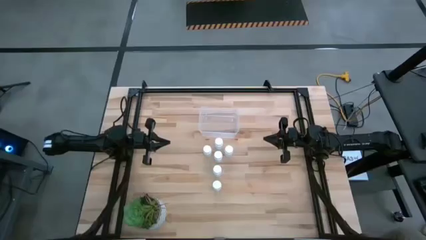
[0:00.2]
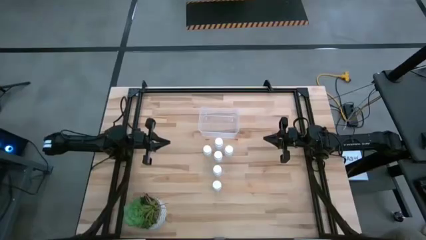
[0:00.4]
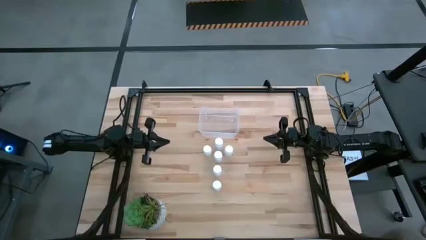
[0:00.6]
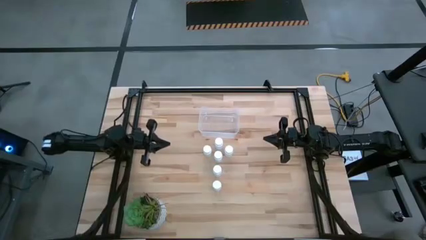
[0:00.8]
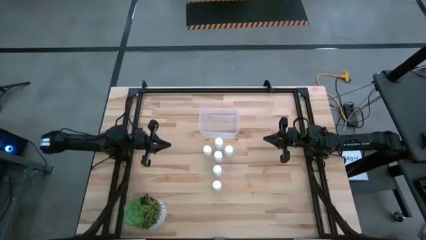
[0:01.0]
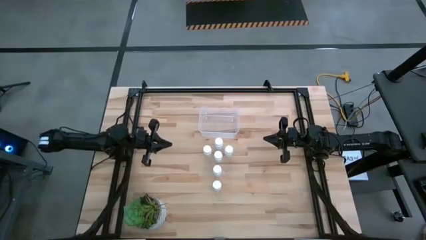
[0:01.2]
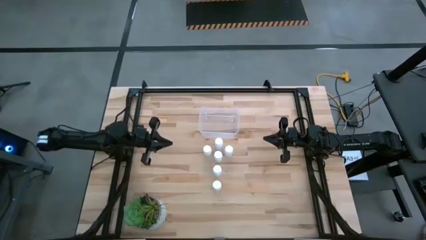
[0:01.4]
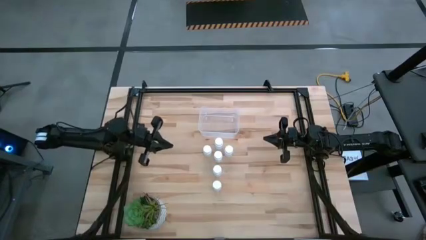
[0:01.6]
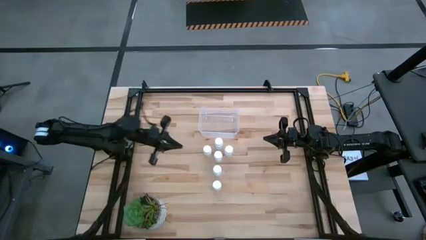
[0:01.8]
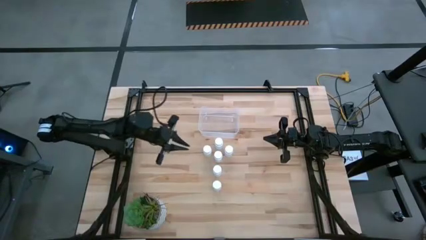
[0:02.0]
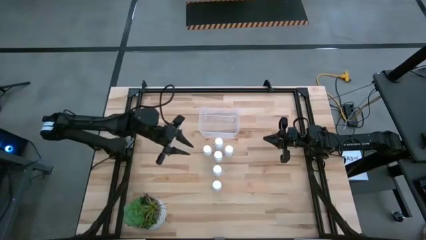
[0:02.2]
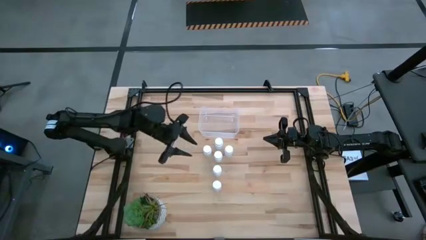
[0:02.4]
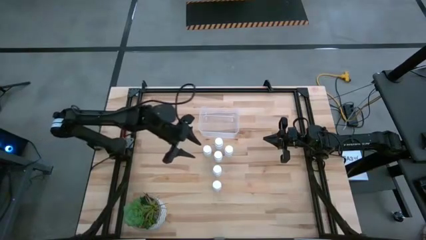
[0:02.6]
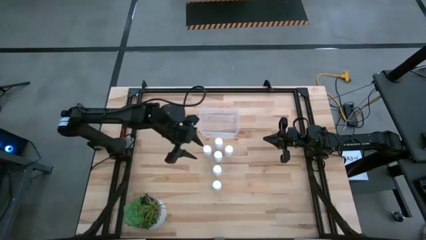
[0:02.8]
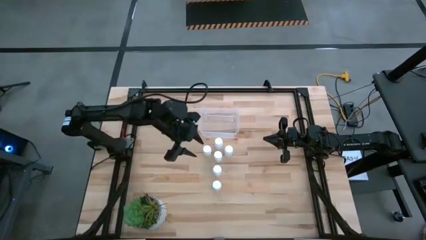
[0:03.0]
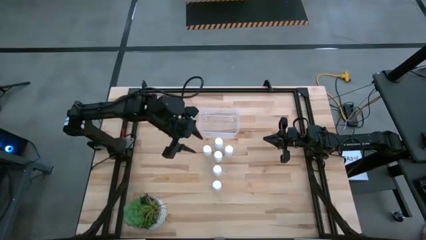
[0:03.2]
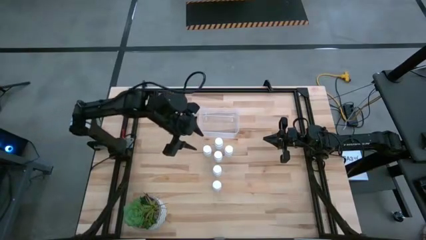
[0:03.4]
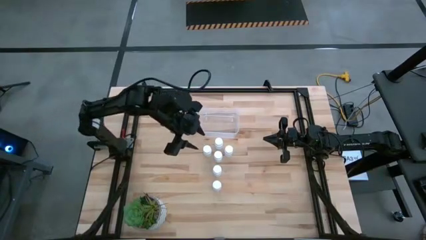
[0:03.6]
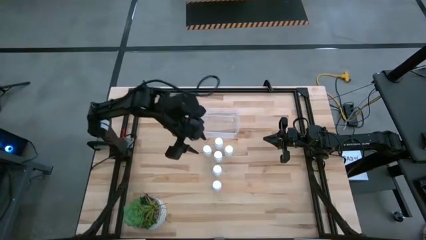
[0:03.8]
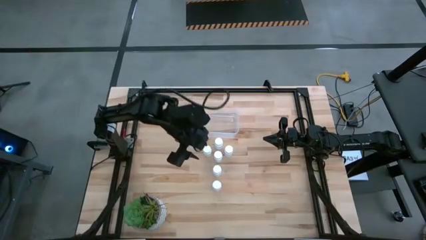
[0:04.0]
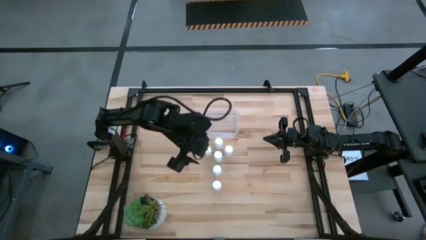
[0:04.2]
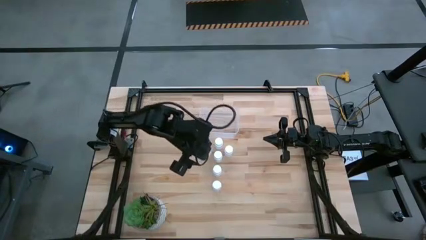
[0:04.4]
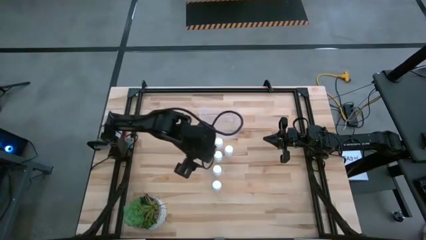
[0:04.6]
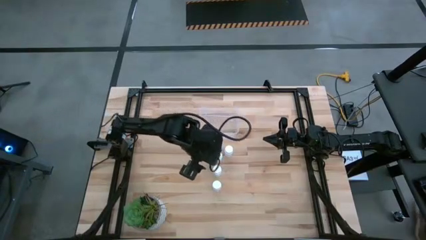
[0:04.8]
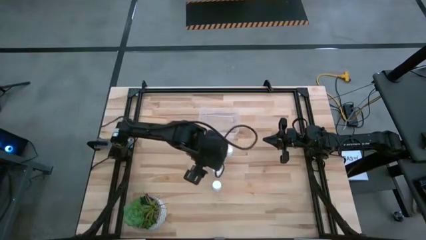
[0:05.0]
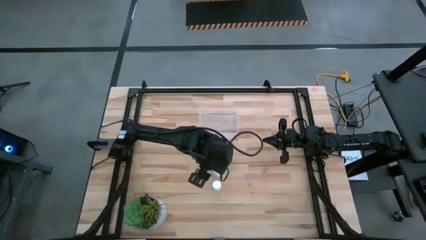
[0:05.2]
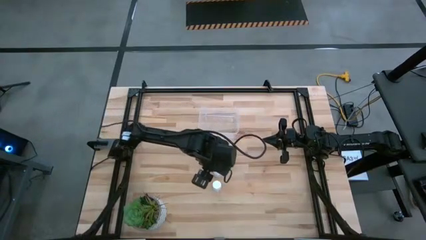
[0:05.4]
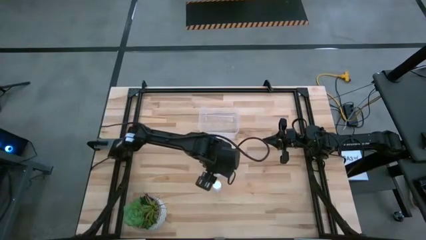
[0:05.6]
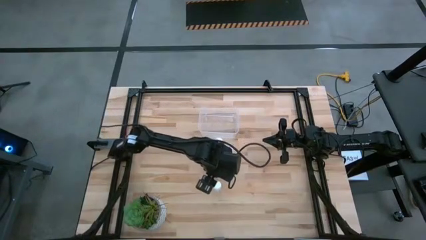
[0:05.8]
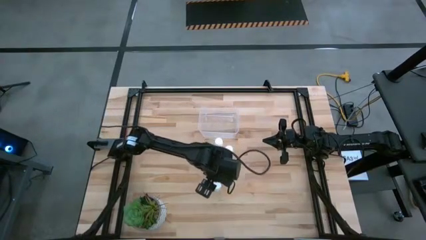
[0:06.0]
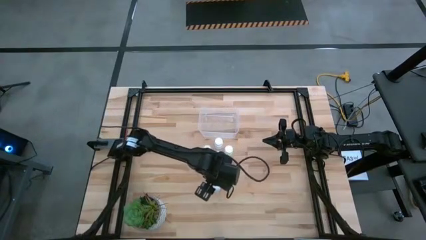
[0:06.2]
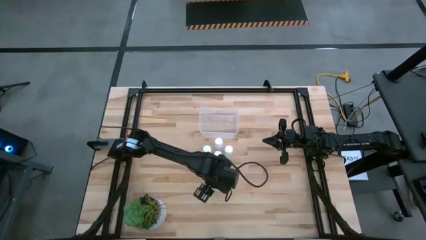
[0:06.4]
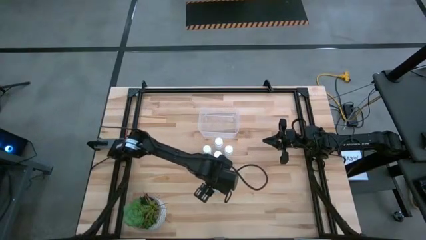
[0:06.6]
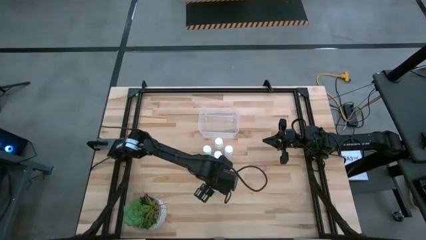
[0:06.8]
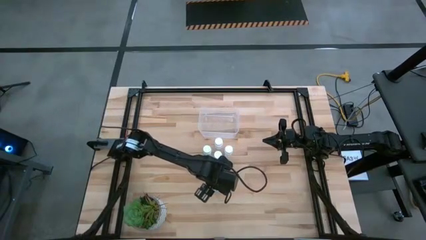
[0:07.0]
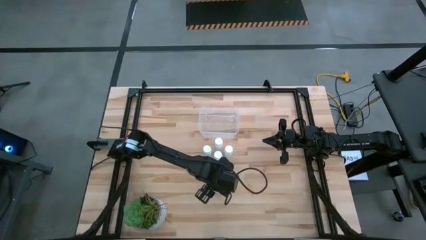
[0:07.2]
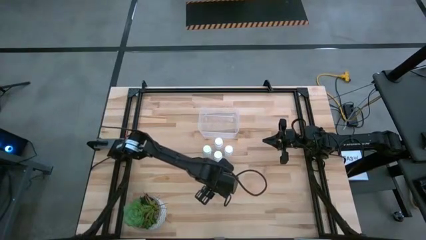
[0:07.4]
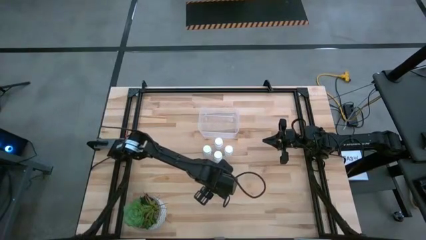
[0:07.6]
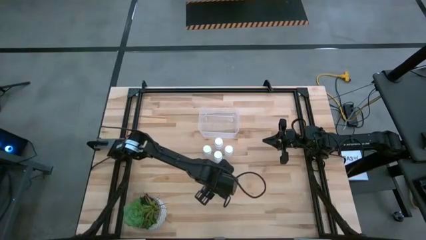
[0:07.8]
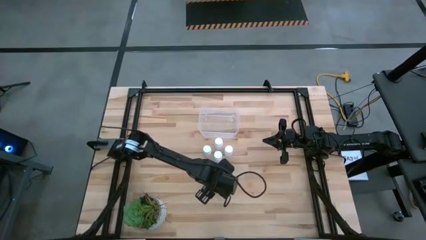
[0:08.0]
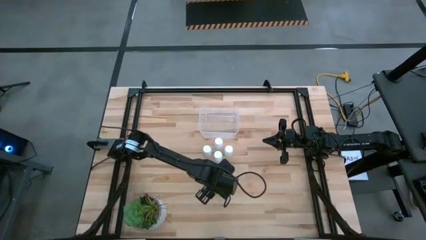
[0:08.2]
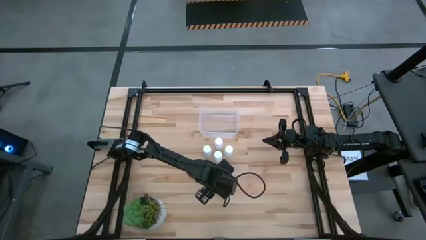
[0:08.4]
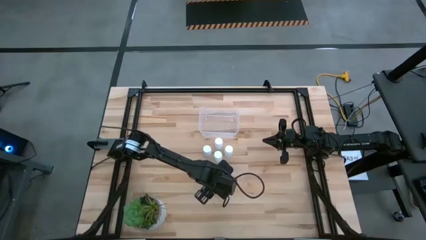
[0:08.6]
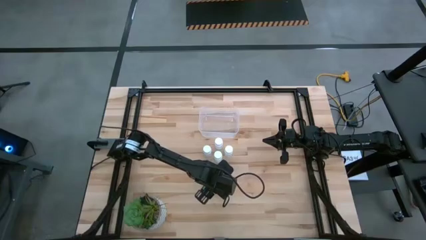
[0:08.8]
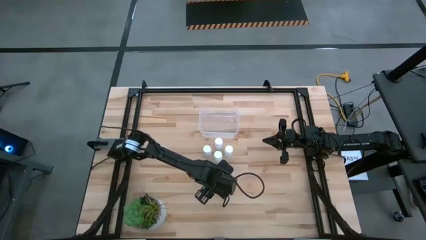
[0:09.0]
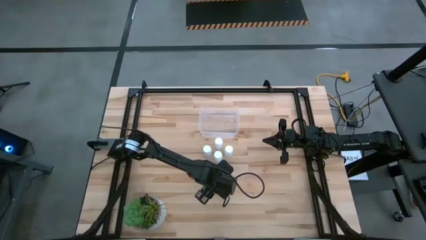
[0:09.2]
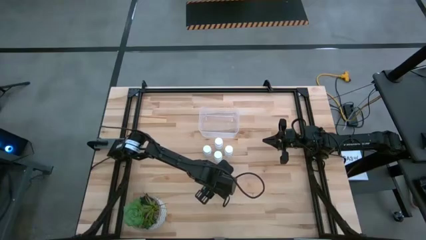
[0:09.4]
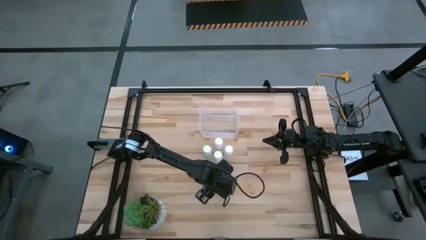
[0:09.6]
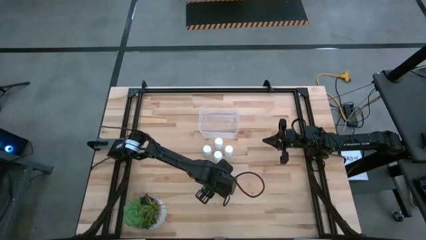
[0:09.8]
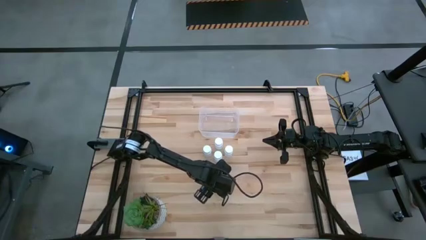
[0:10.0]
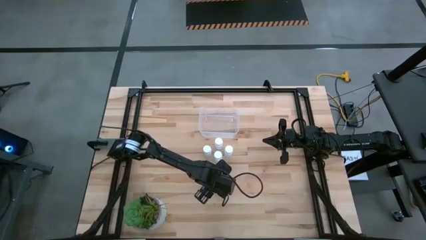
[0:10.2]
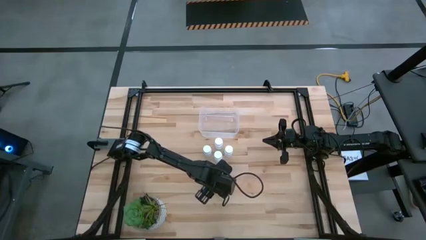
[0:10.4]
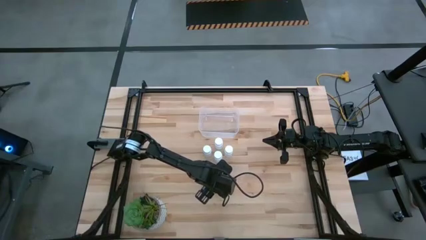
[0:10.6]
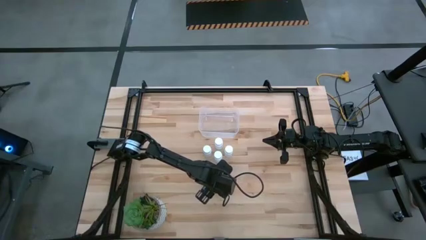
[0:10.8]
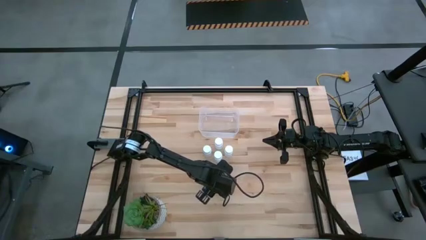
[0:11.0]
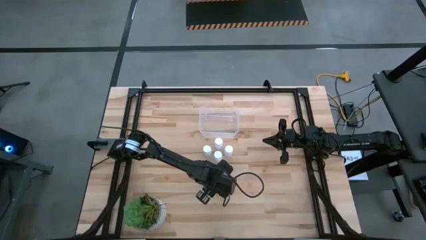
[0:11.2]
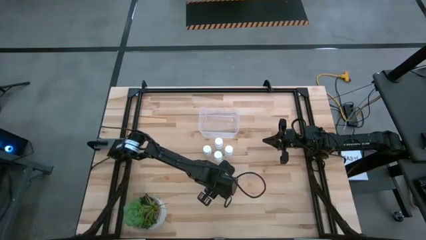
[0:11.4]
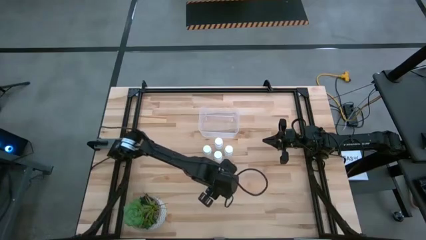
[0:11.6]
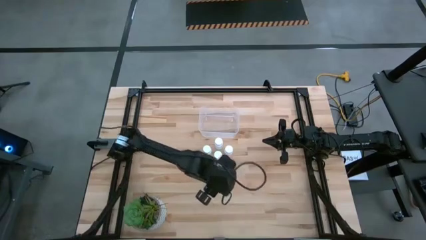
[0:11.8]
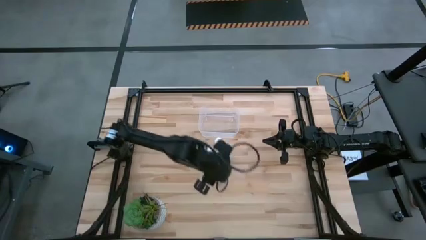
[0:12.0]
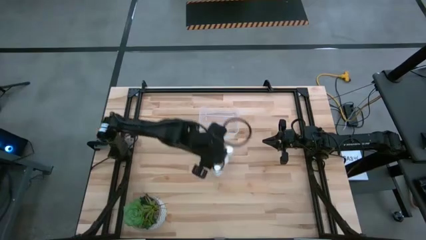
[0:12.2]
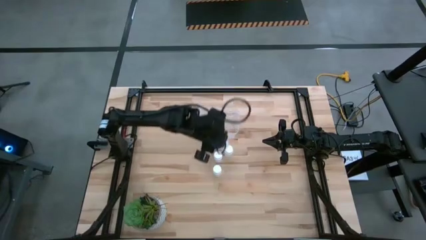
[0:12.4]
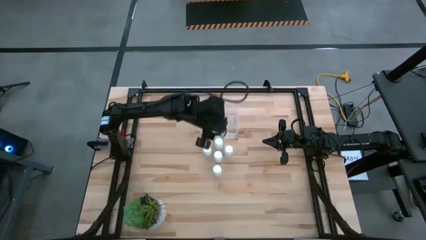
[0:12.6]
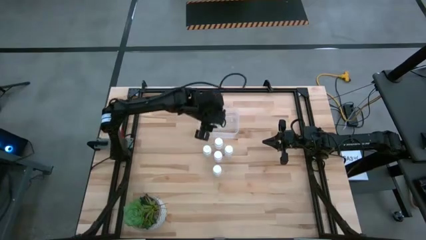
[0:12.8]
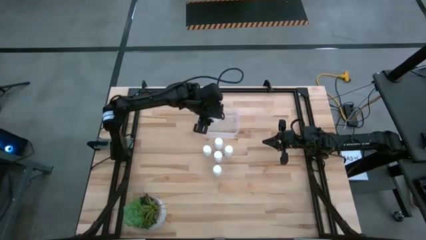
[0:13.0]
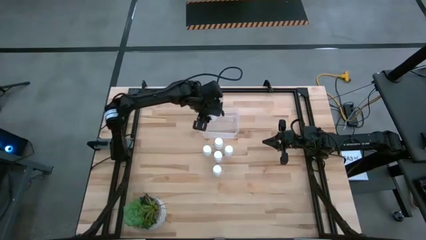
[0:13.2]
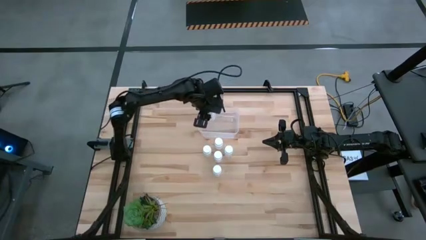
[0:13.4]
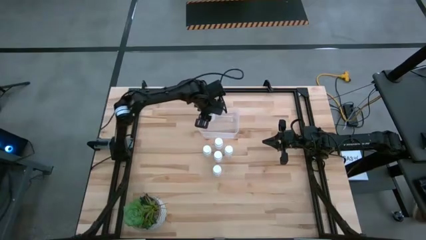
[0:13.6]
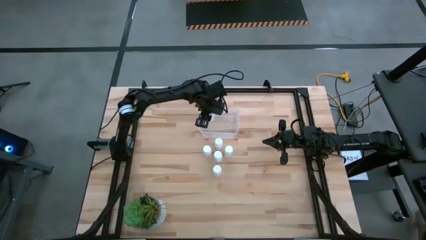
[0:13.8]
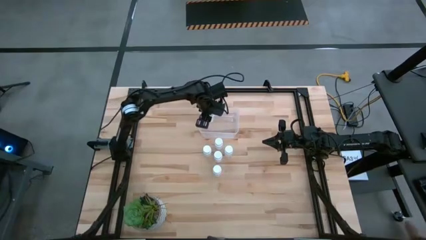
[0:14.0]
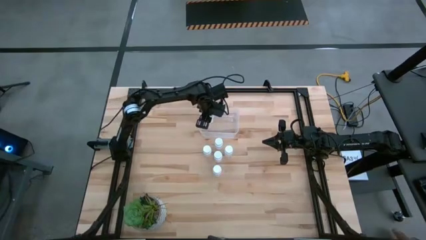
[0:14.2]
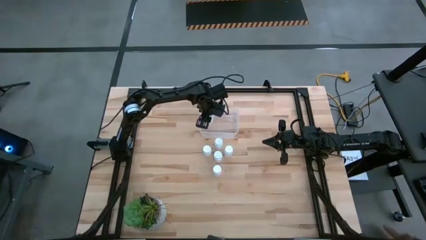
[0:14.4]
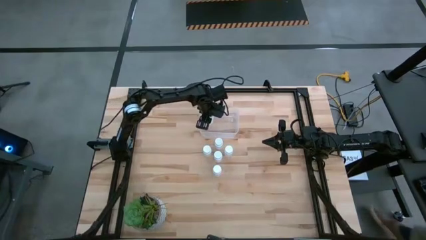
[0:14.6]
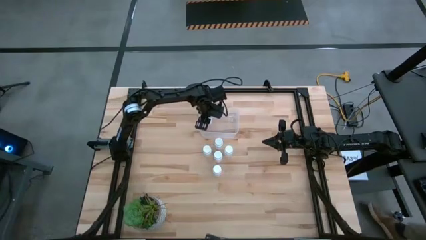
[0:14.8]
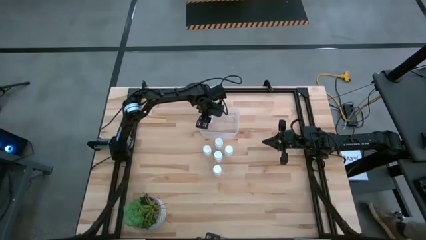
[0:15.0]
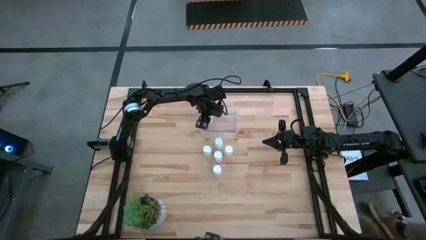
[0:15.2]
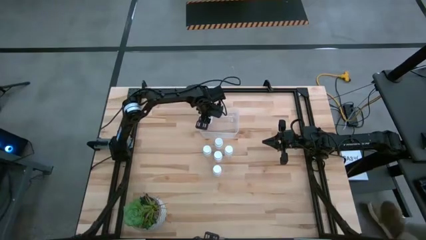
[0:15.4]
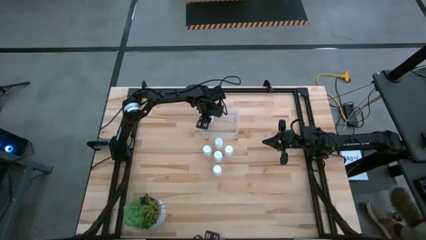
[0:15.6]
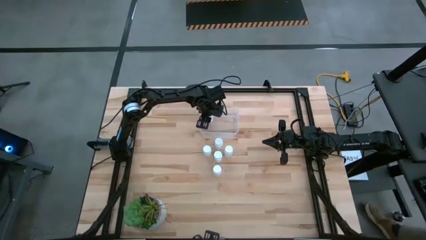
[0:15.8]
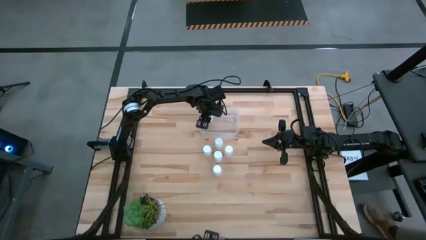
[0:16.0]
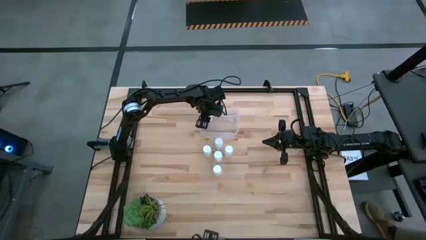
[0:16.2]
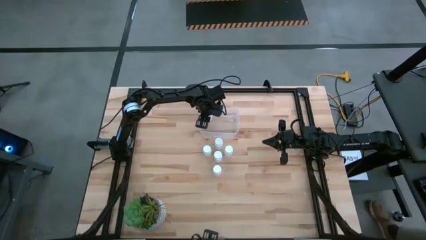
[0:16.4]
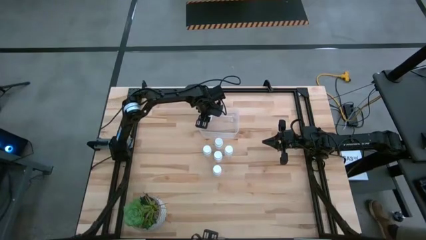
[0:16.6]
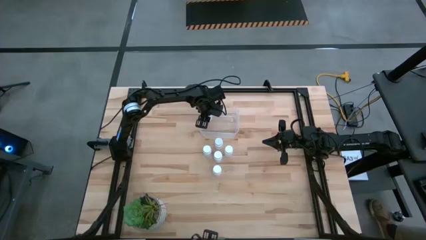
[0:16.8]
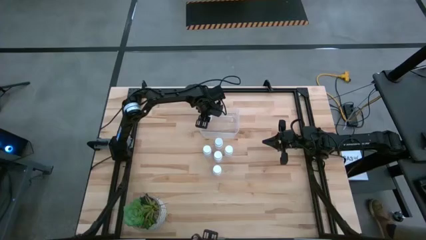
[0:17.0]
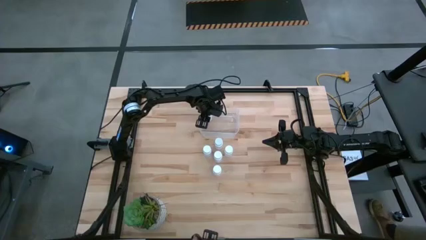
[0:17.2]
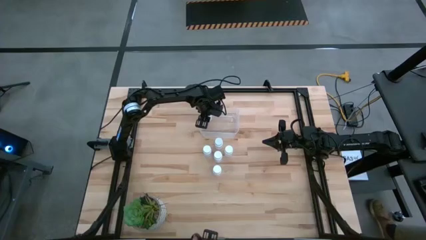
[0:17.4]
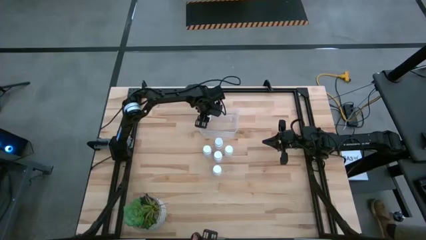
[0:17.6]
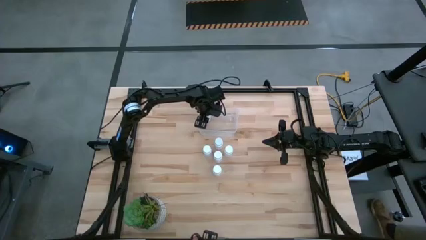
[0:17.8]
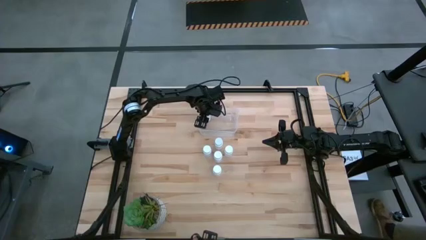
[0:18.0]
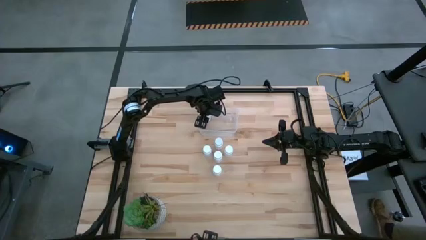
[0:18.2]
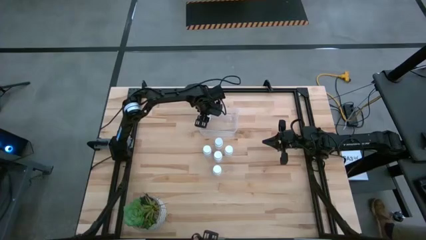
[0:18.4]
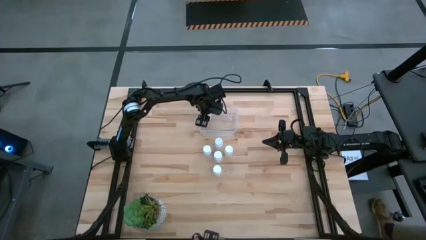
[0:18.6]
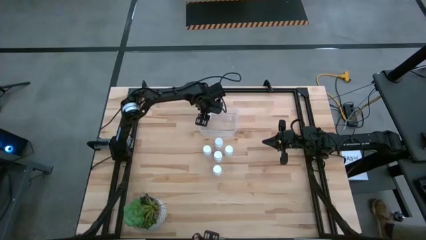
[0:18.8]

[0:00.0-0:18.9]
Task: Pick and place pill bottles into a basket
Put the white pill bottle into the transparent bin
